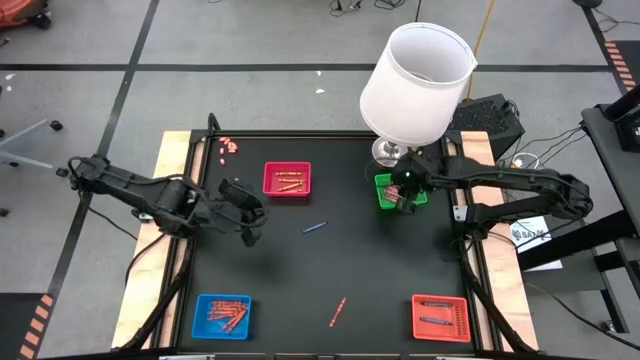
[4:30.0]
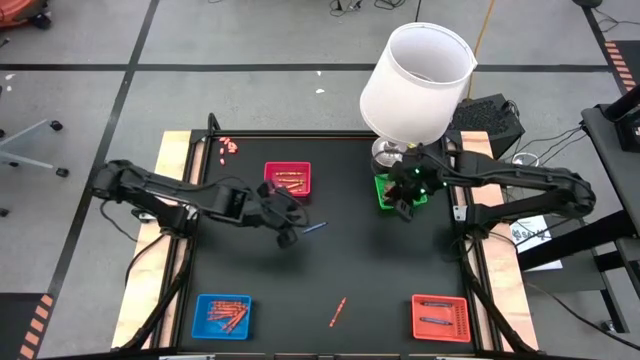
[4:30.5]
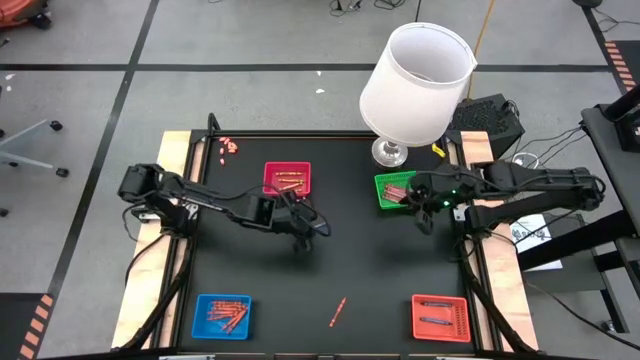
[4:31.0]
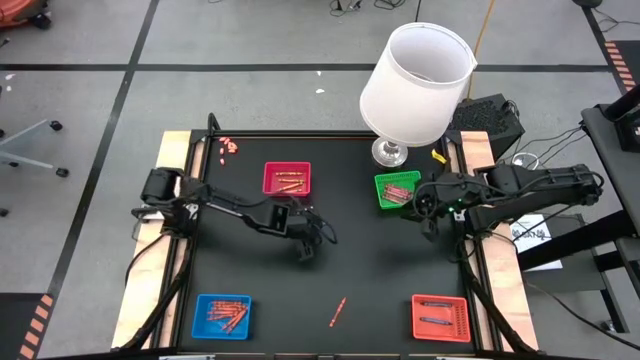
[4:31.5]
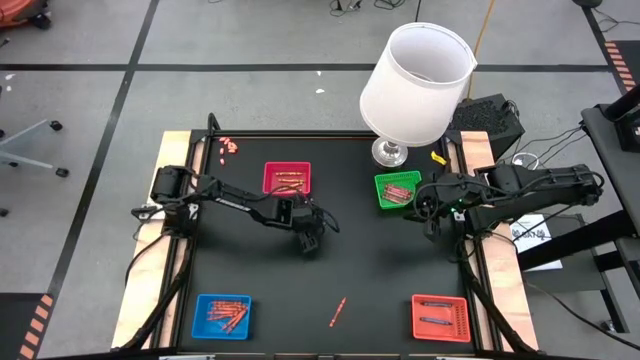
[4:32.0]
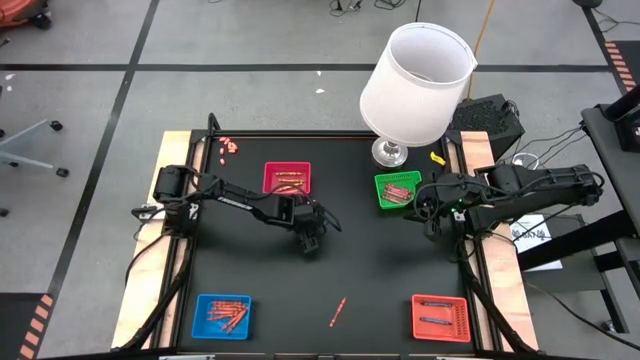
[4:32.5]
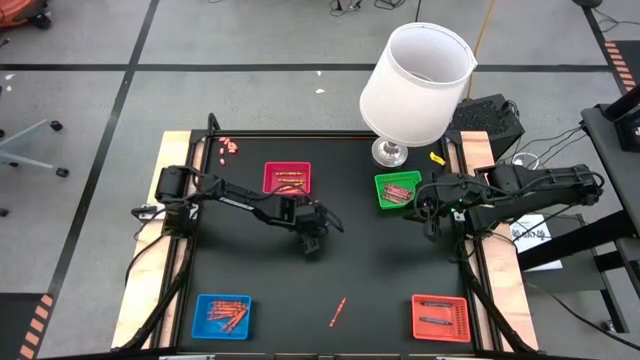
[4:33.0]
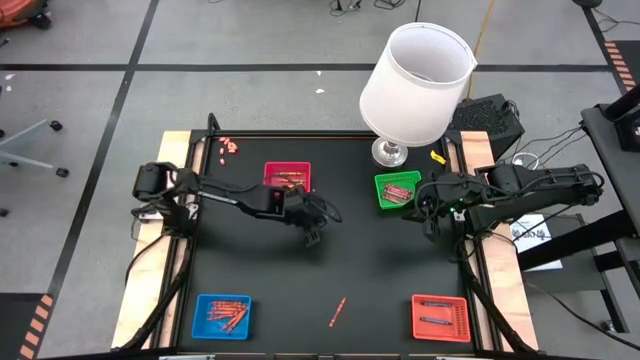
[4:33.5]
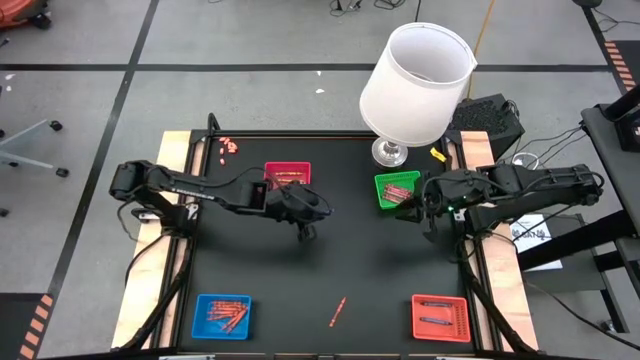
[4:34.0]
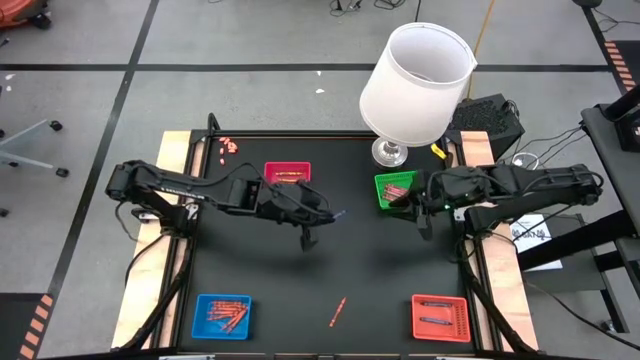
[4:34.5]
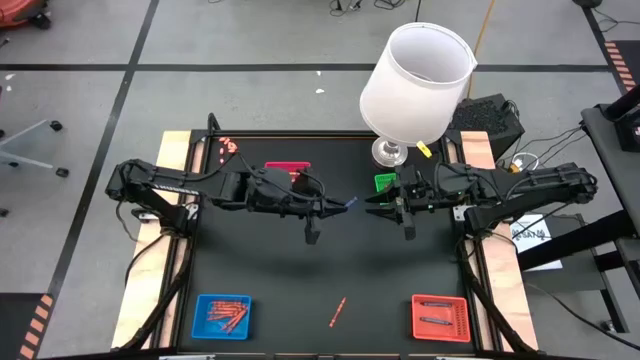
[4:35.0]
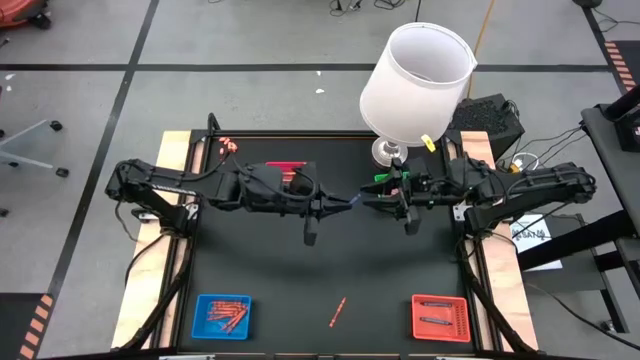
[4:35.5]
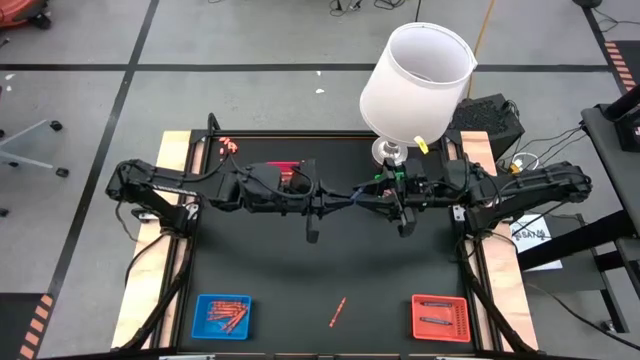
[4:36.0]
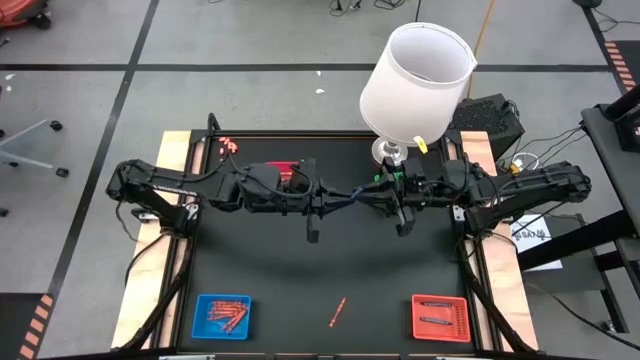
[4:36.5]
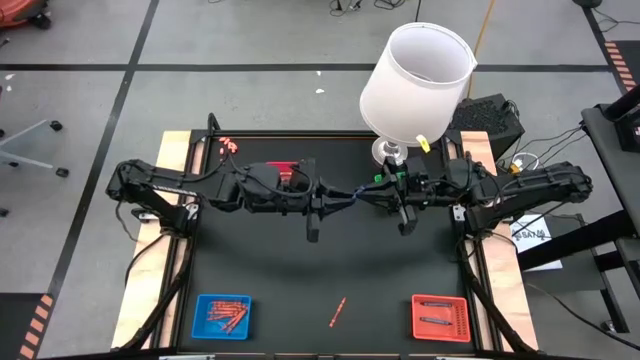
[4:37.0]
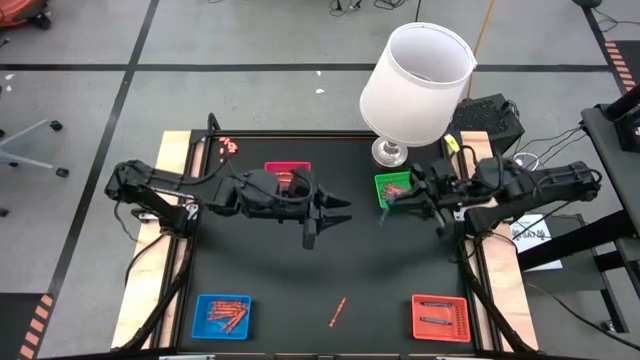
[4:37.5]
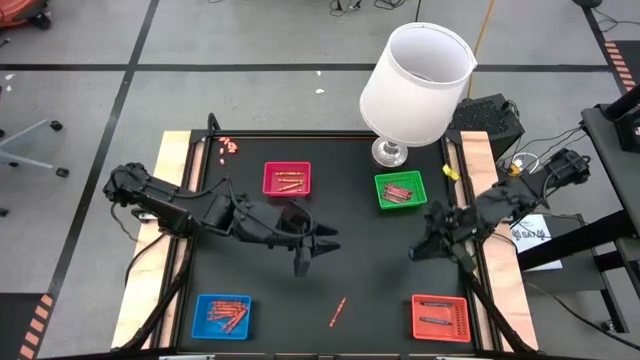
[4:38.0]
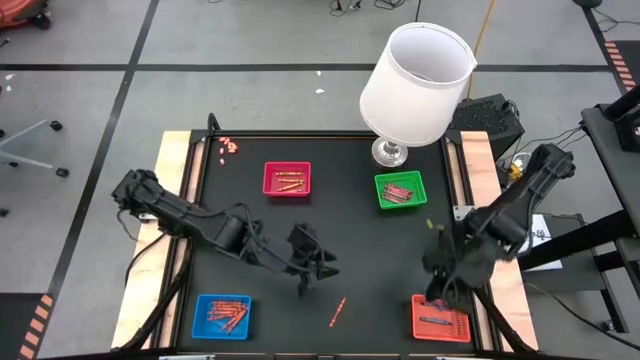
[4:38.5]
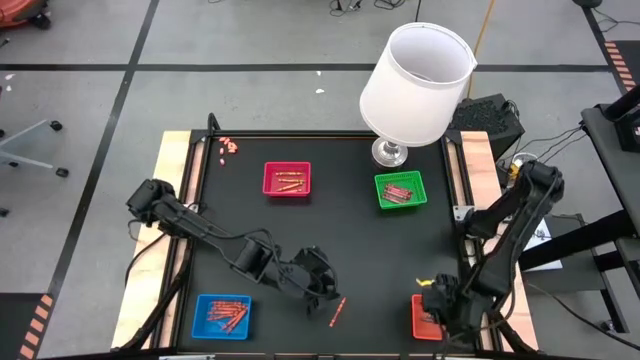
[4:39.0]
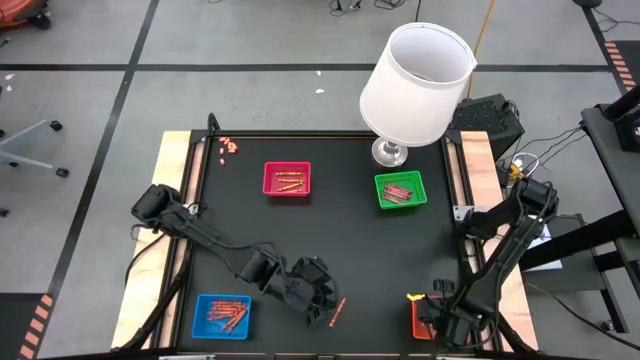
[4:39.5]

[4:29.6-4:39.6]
Task: Sort crayons
Put the blue crayon into the orange basket

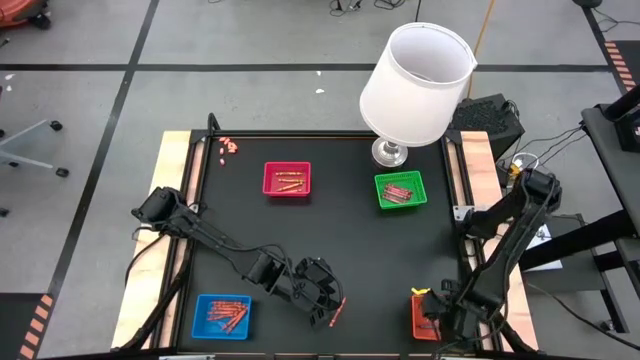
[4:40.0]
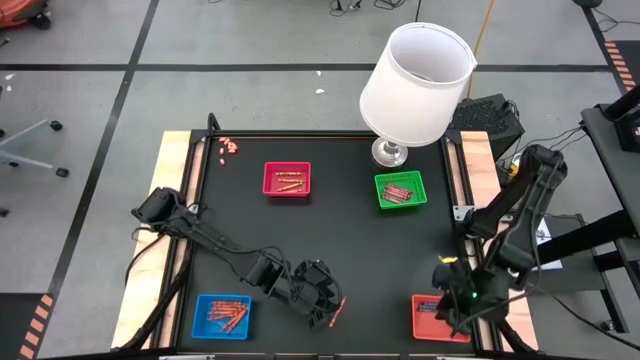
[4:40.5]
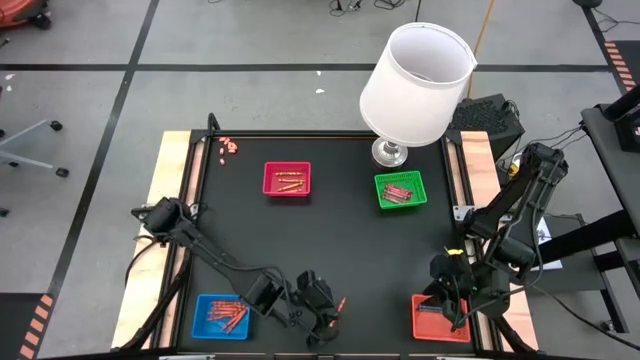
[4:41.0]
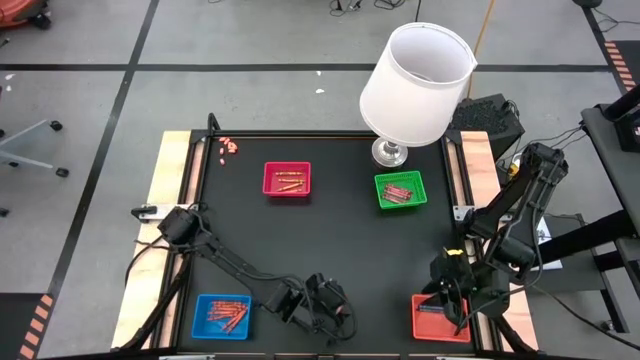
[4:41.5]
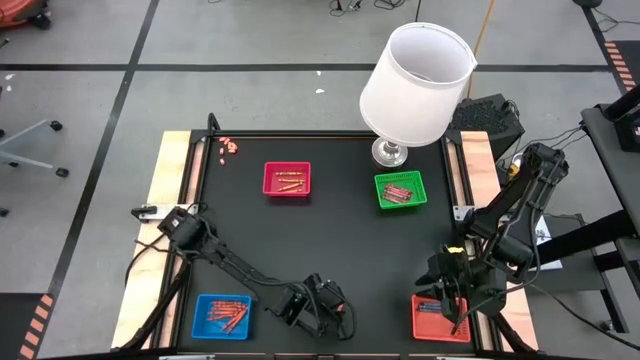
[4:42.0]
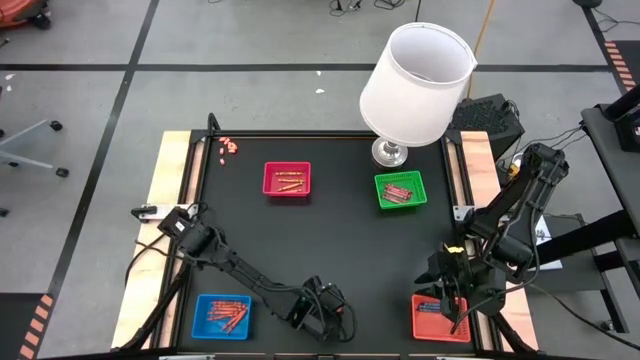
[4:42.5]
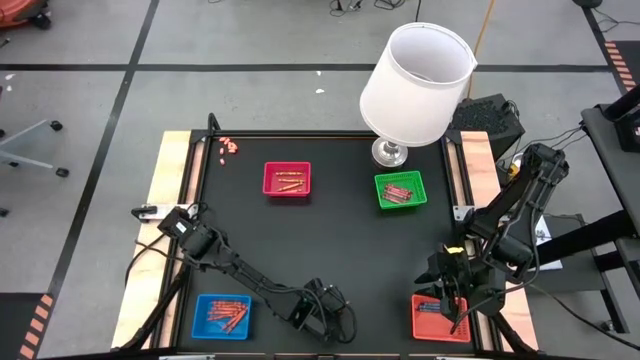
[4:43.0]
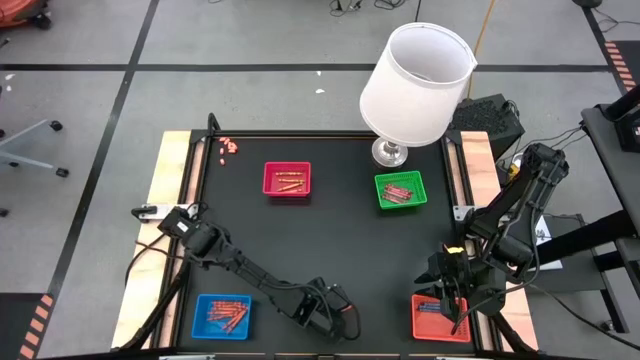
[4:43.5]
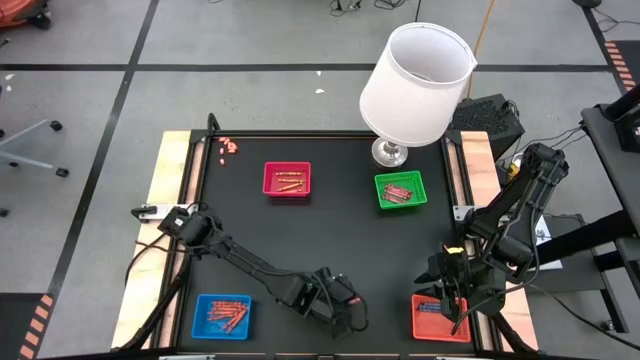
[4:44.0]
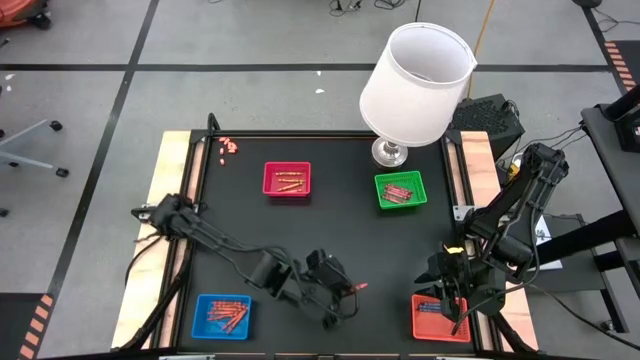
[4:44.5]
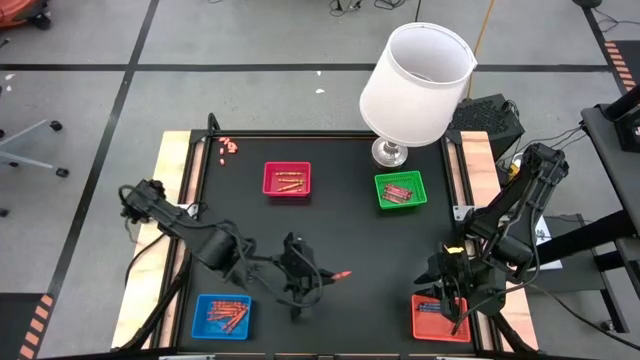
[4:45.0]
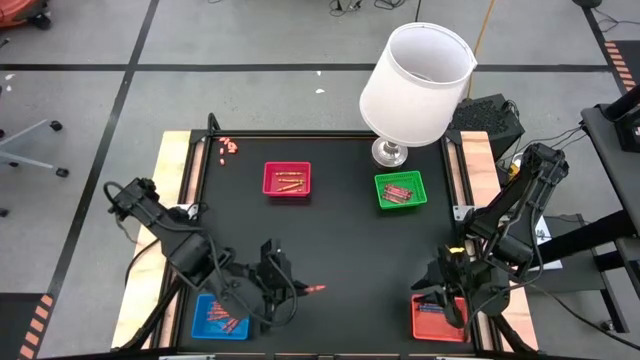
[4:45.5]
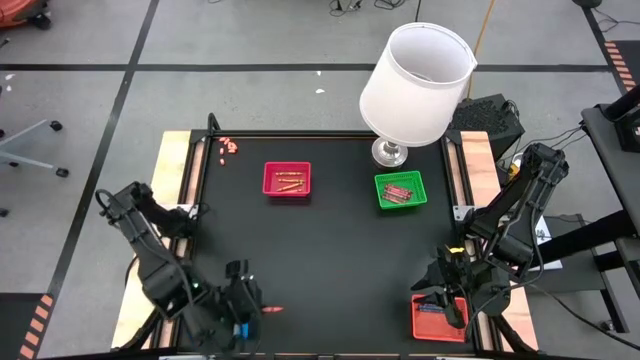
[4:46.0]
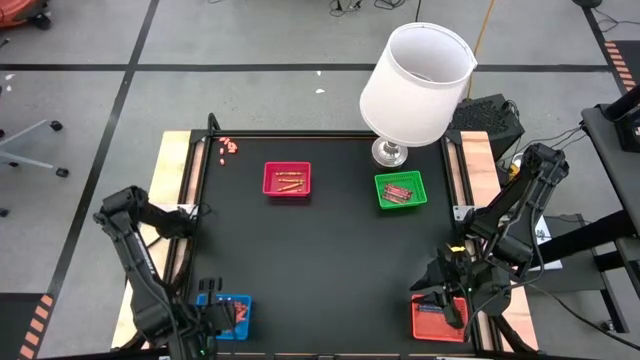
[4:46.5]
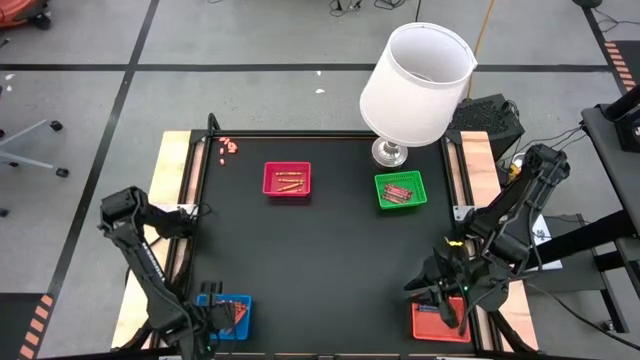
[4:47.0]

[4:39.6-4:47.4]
Put the orange crayon into the blue basket

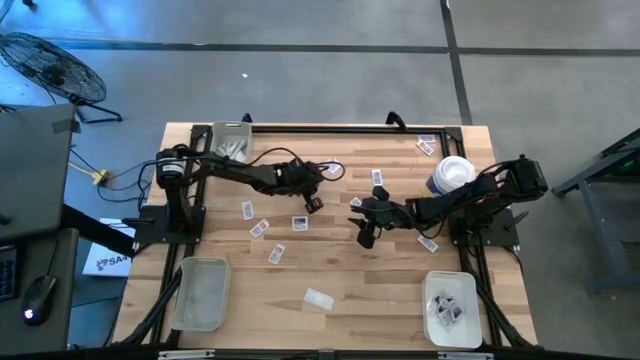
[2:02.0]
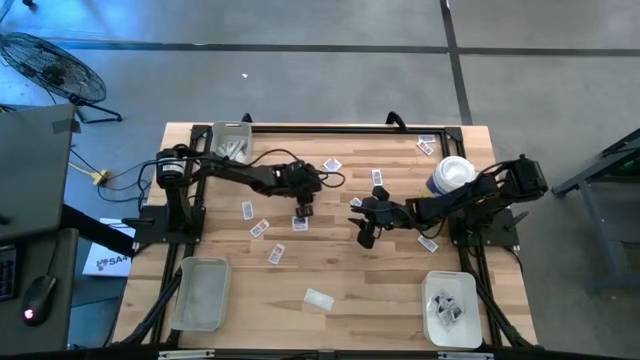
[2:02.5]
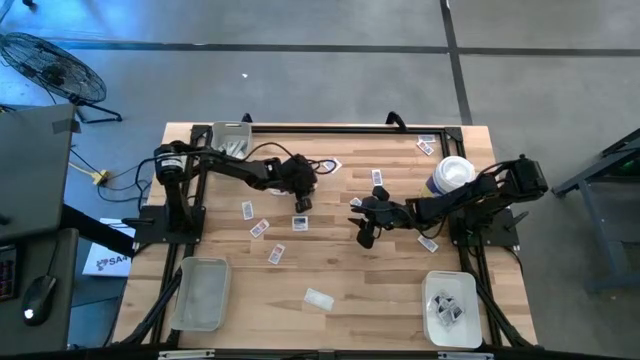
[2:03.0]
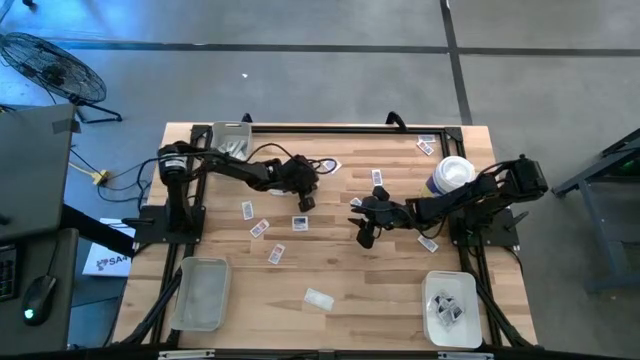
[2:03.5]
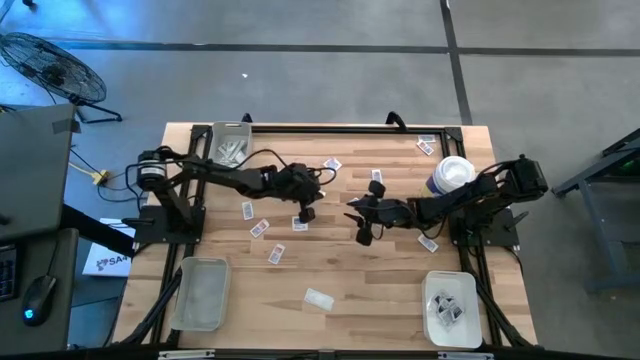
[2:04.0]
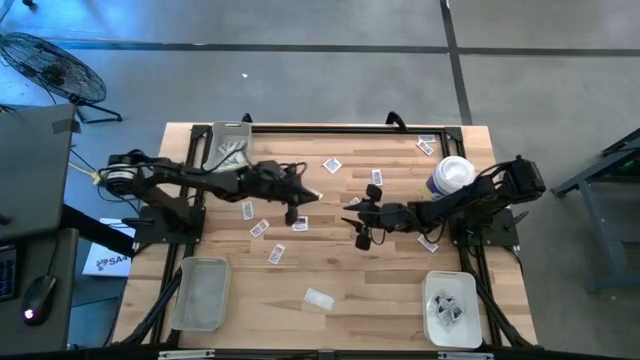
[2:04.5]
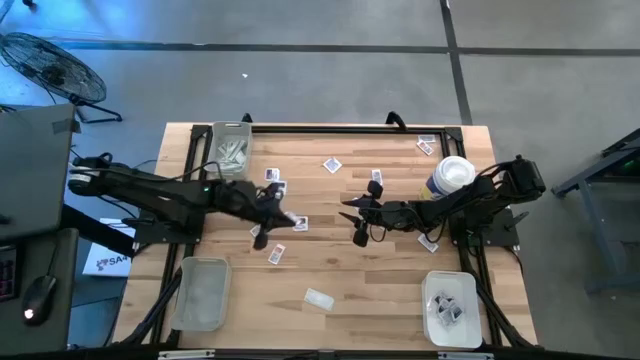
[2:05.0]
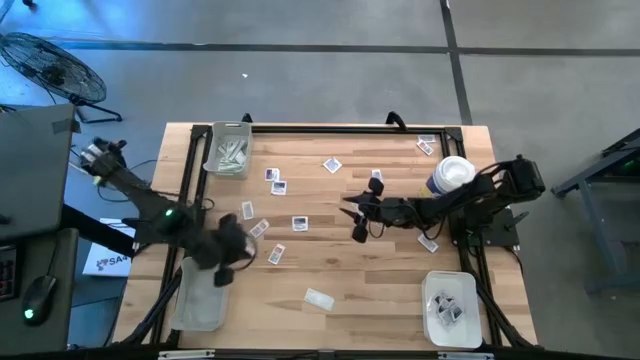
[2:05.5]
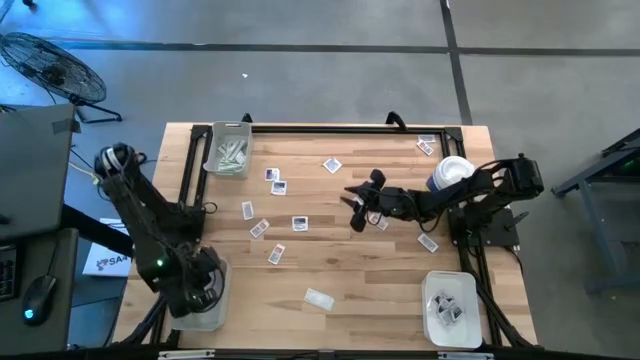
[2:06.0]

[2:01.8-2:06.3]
Task: Pick & Place First Aid Supplies
Put the orange ointment pack into the bottom gray bin
